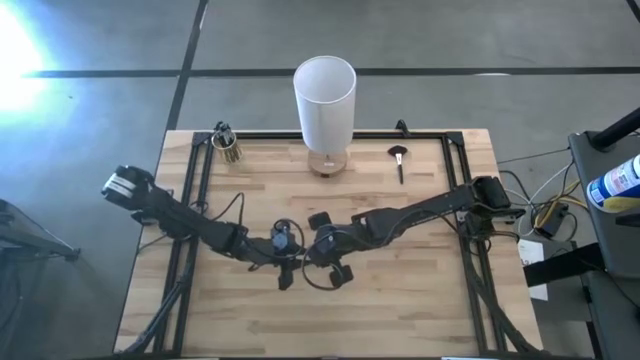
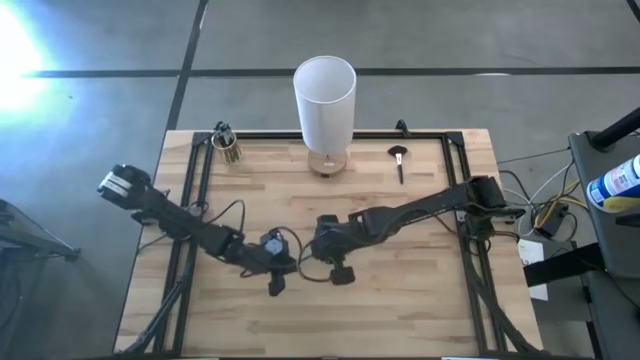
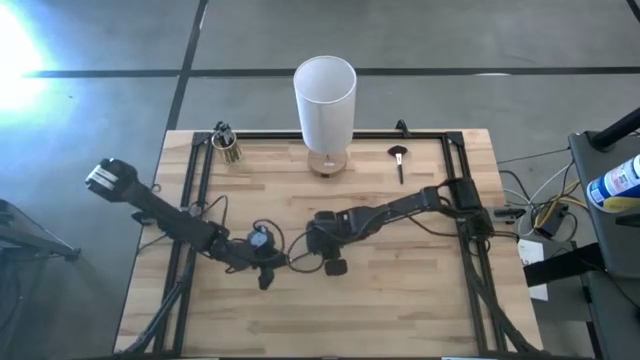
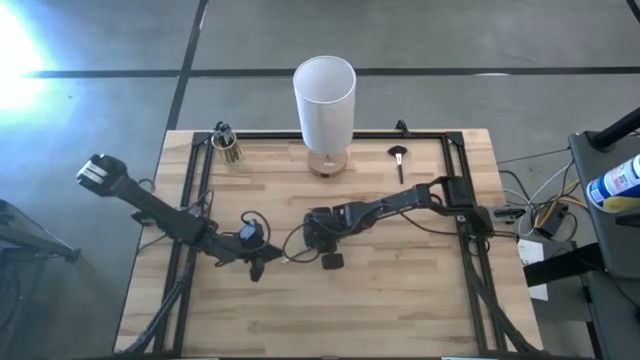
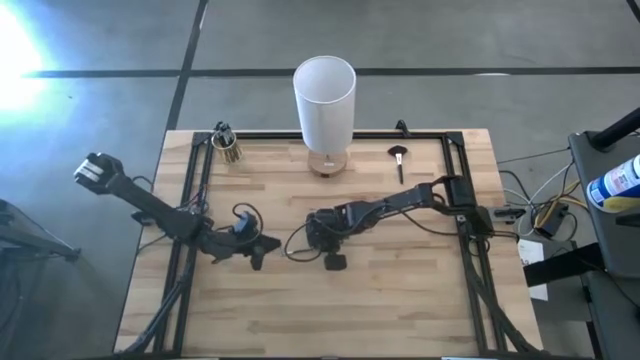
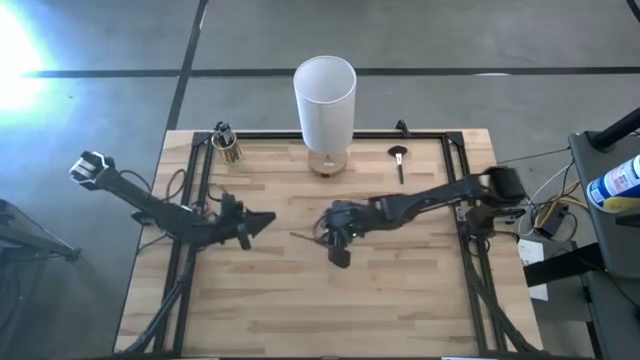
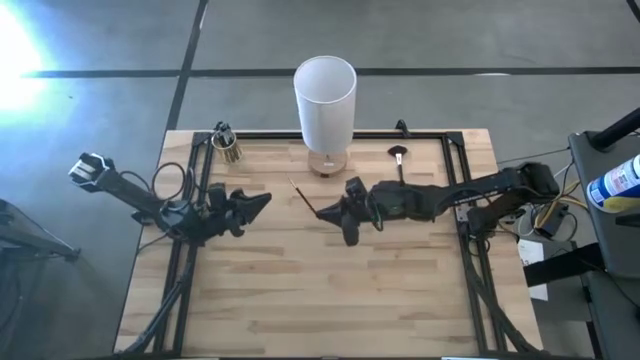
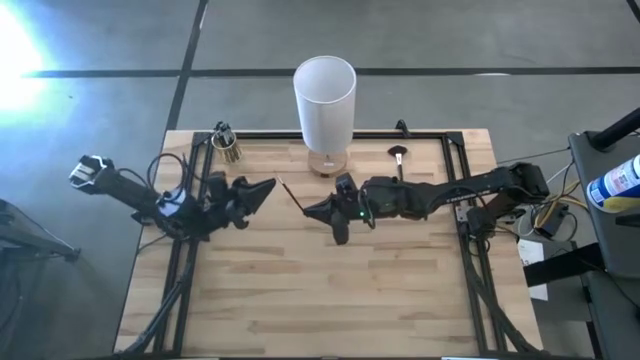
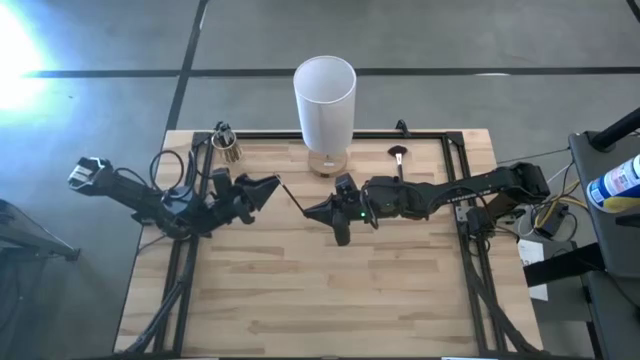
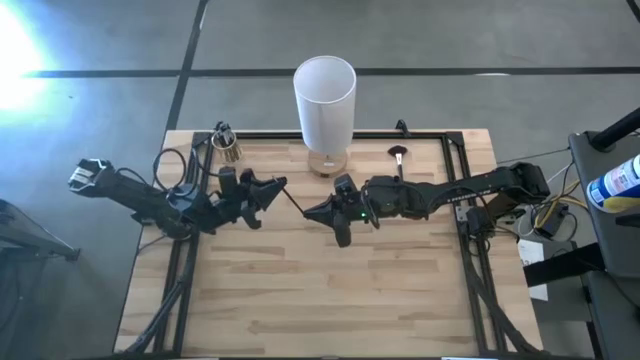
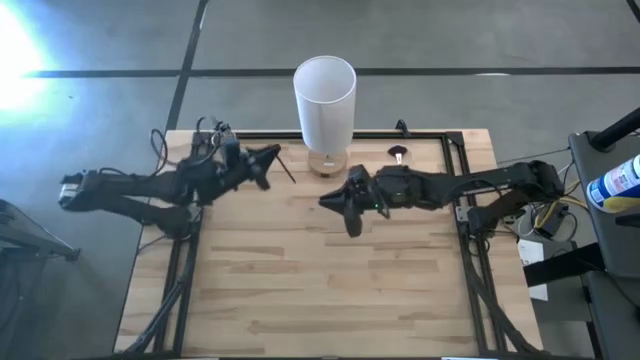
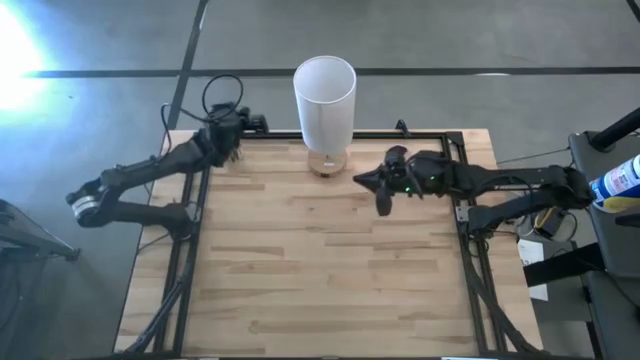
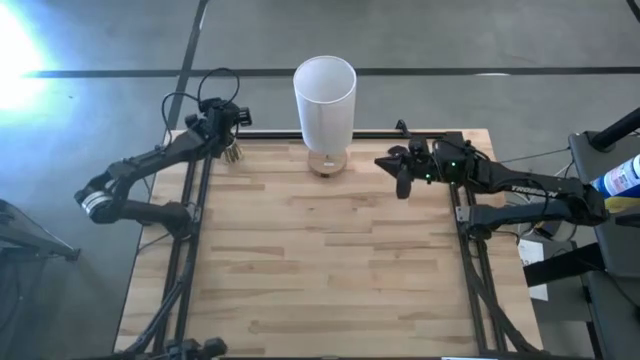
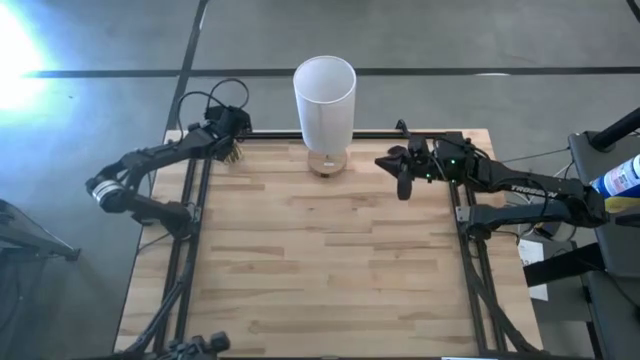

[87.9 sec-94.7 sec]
Task: Pick & Place Makeup Brushes
Put the eyeshadow brush into the makeup holder

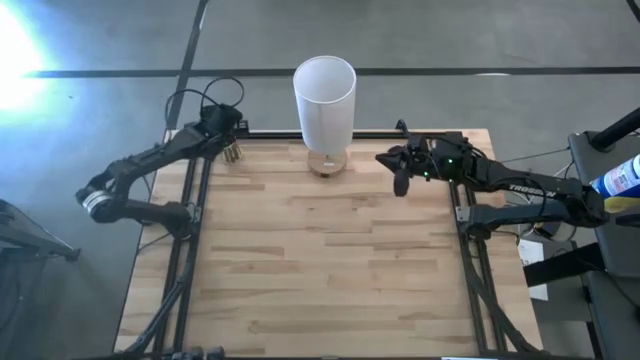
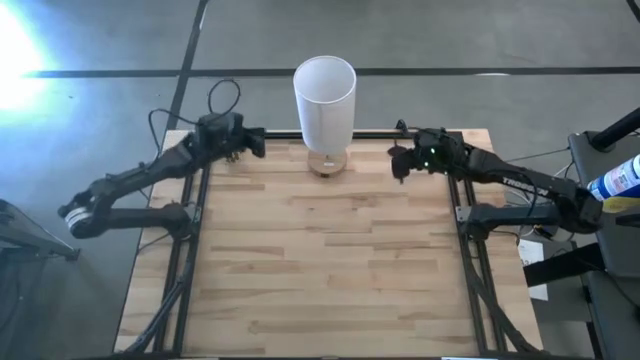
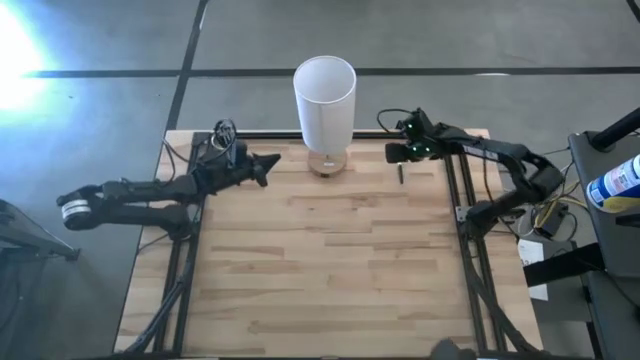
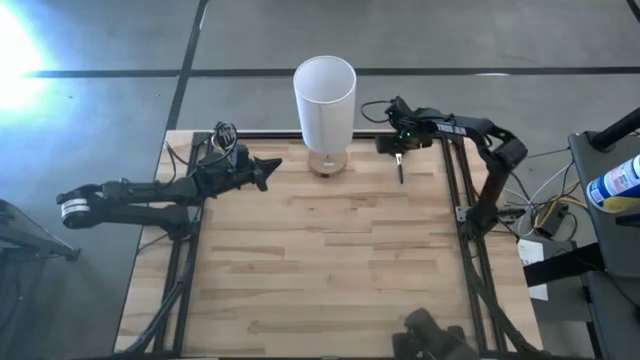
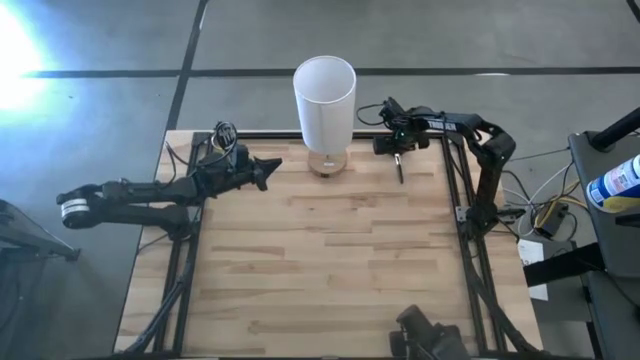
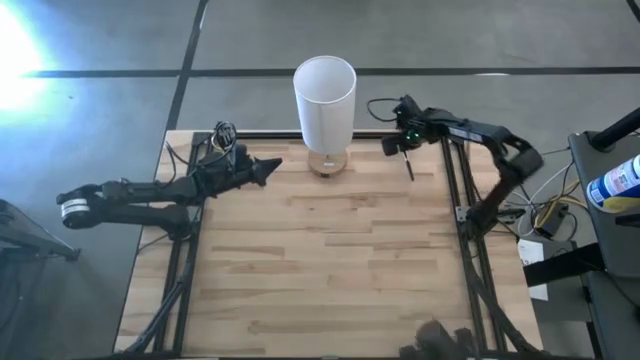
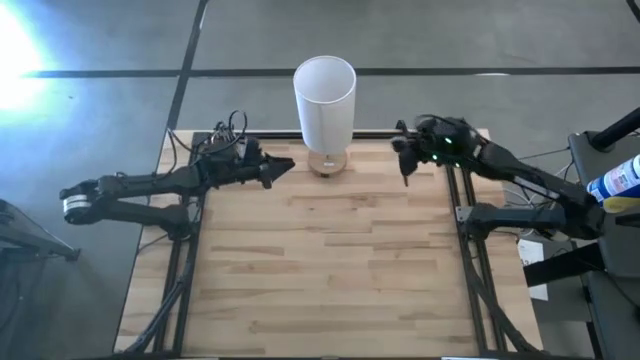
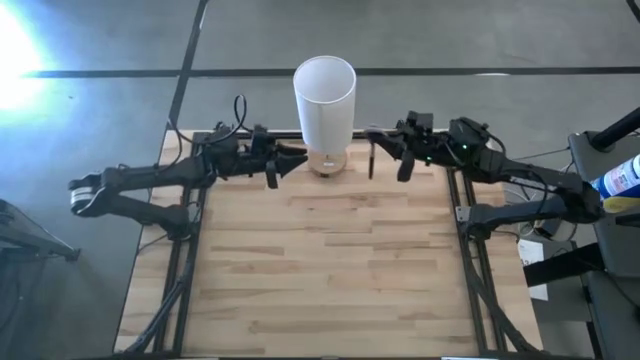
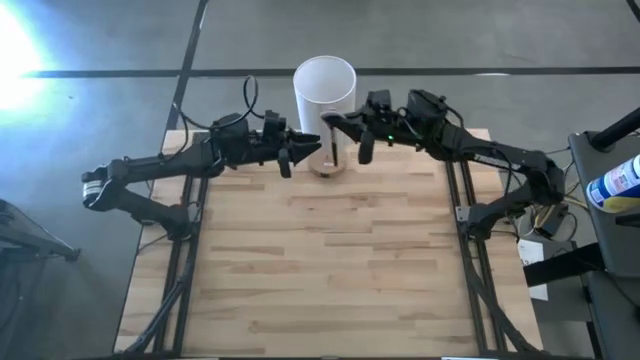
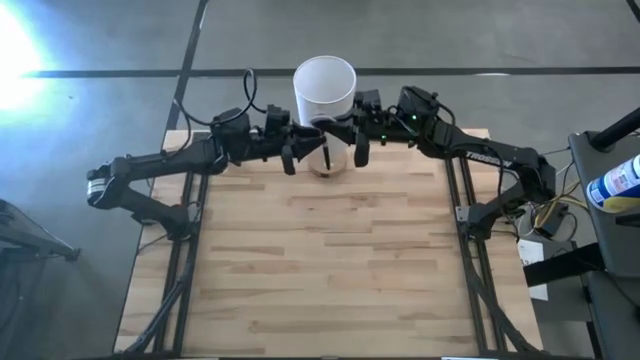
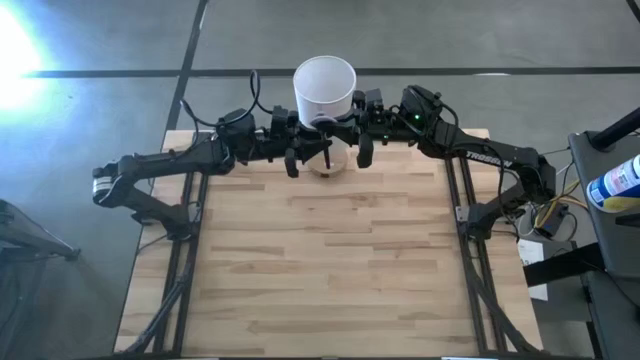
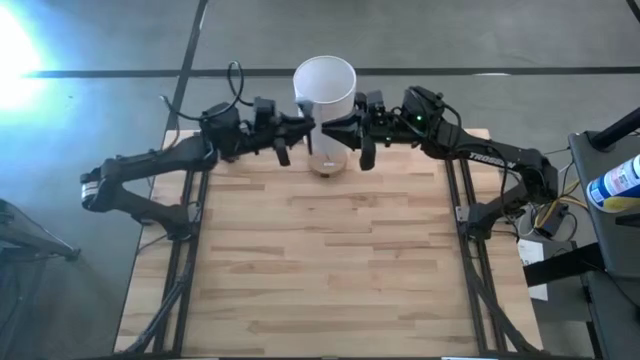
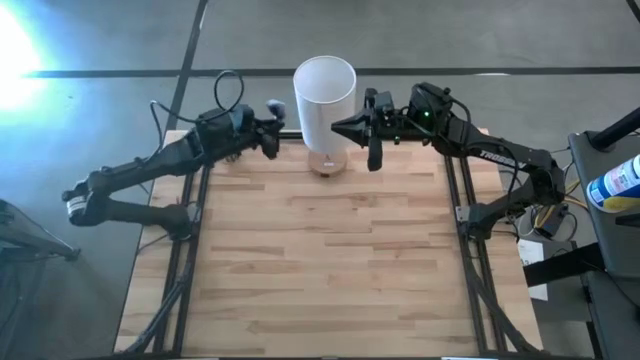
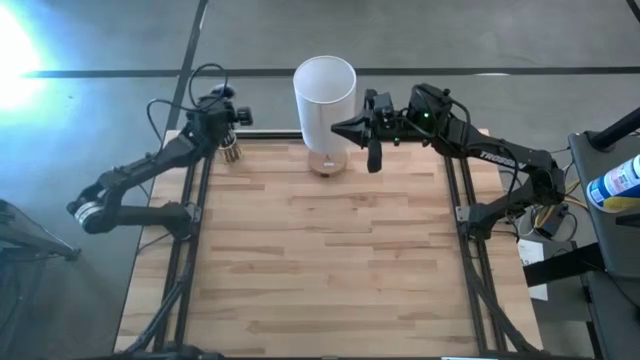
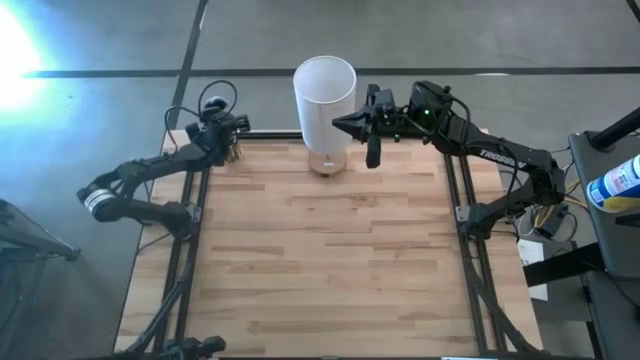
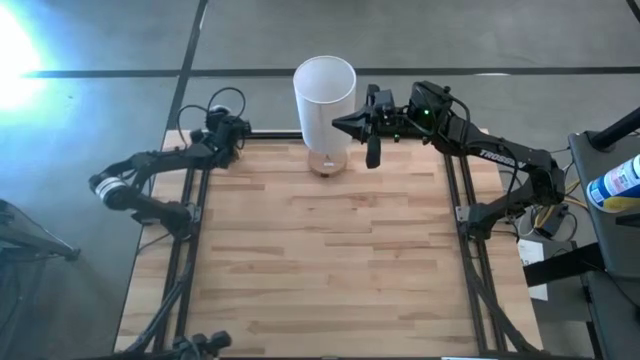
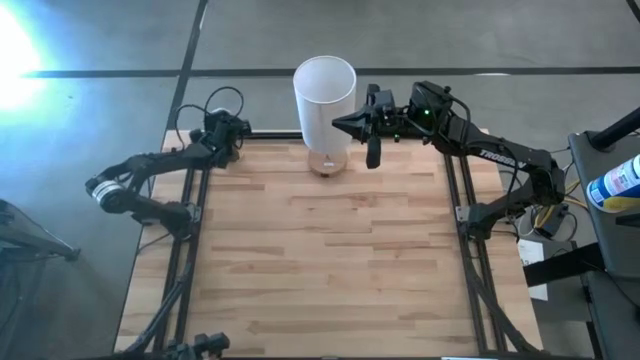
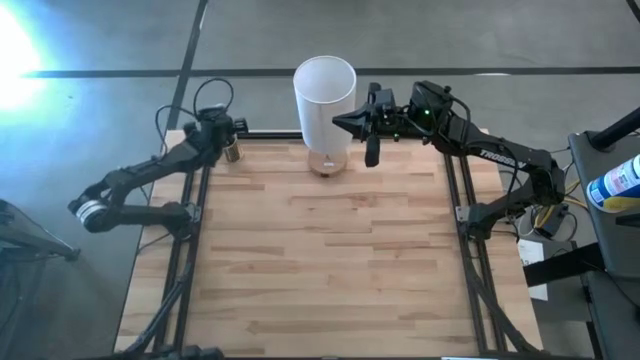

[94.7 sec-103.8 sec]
Put the highlighter brush into the makeup holder

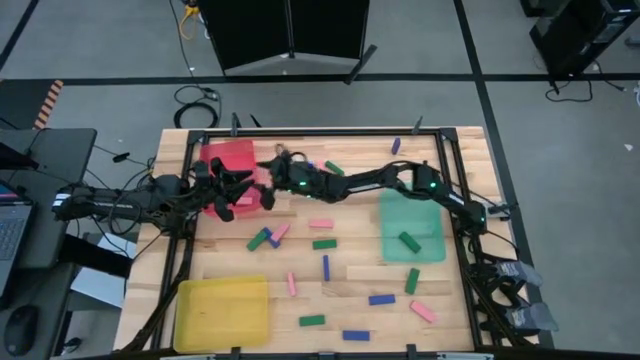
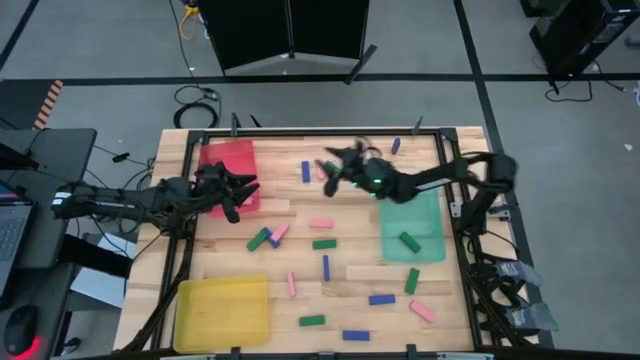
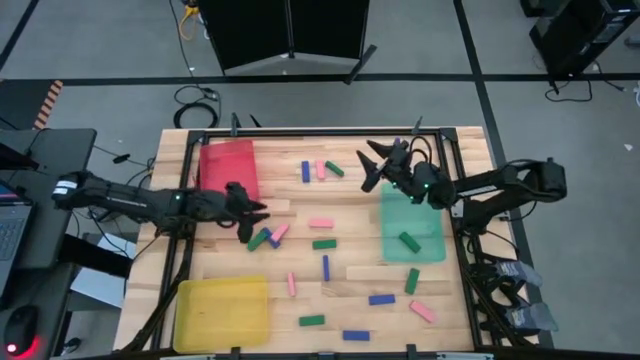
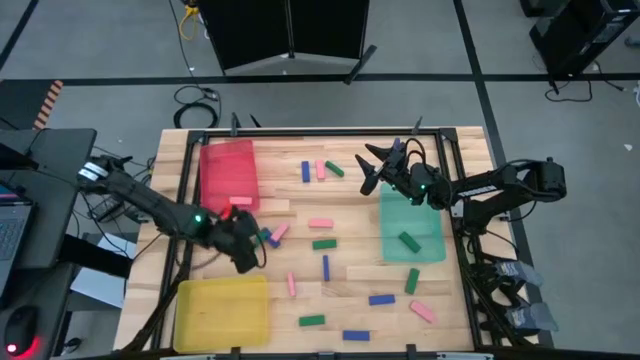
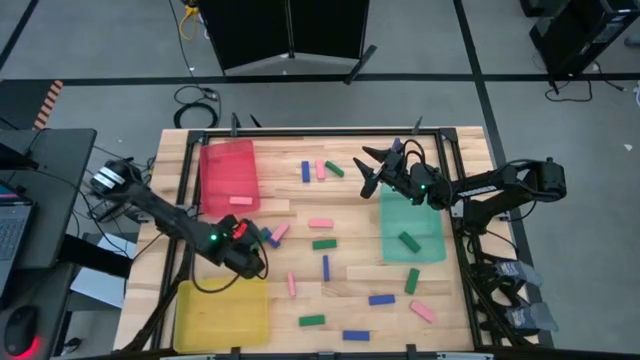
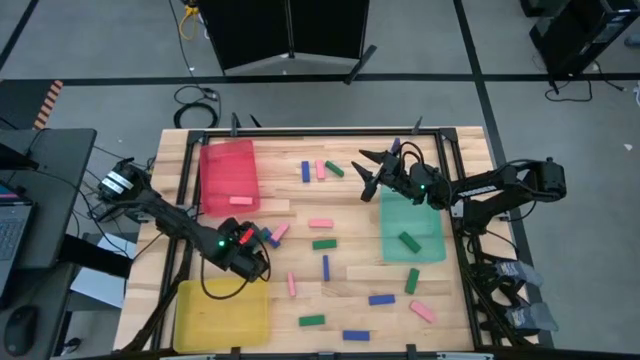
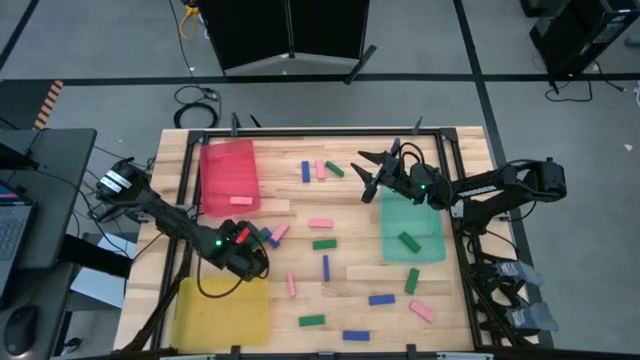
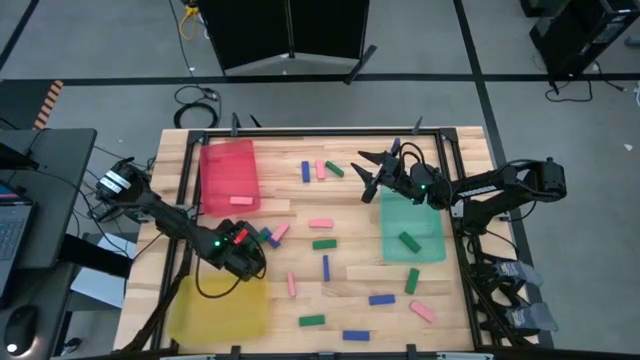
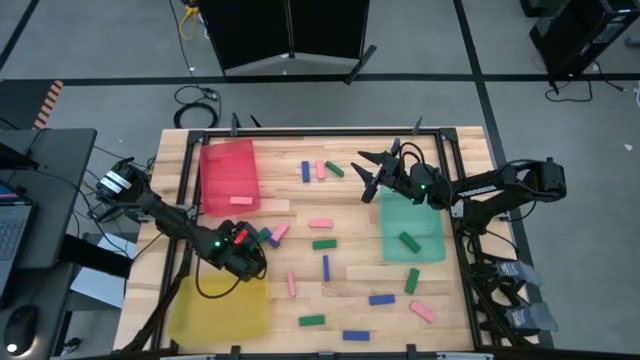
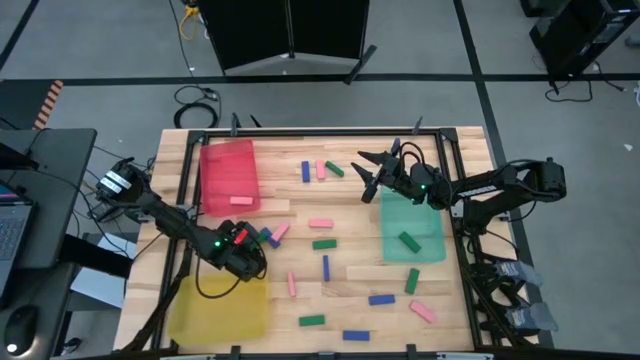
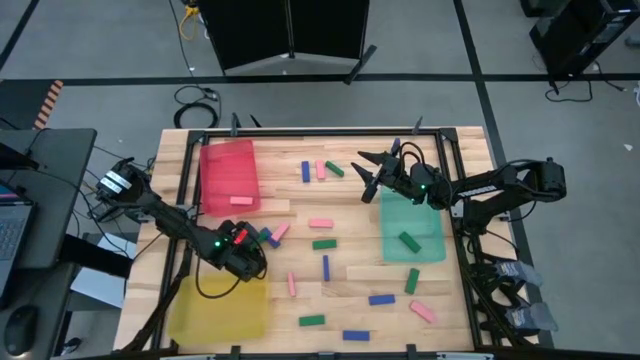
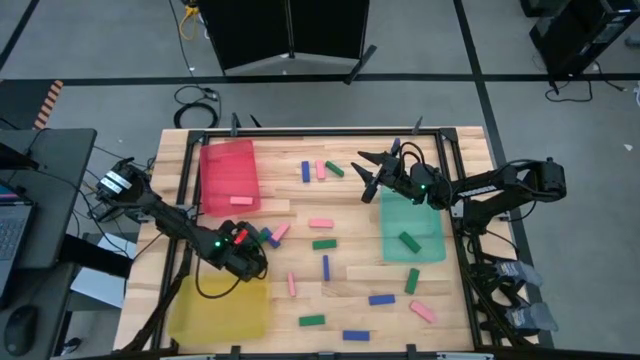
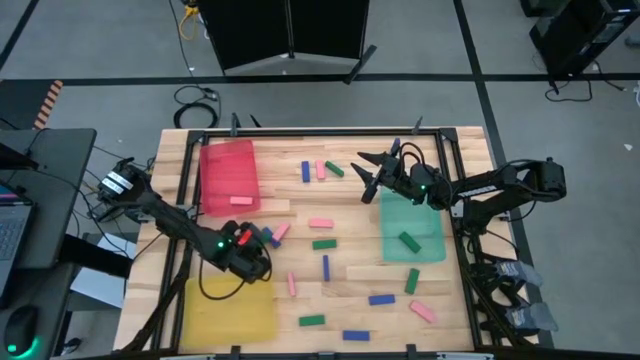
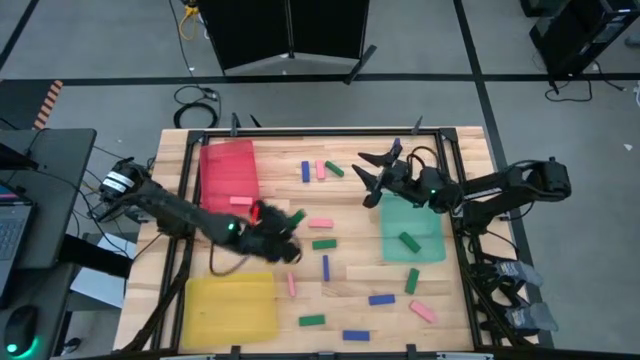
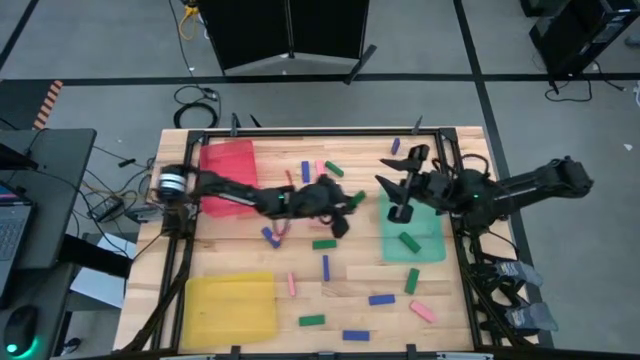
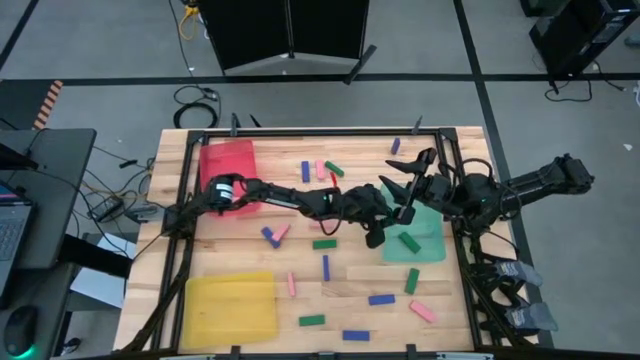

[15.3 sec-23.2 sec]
Task: Sort blocks
Put the green block into the blue bin
